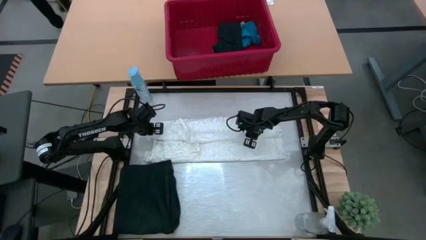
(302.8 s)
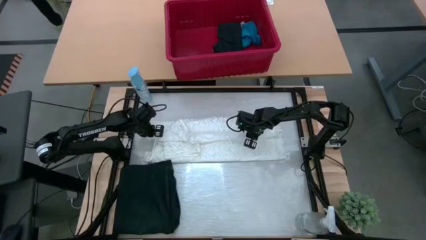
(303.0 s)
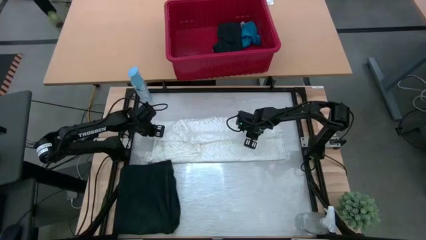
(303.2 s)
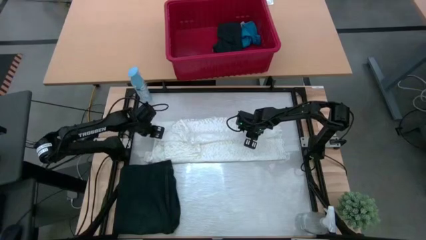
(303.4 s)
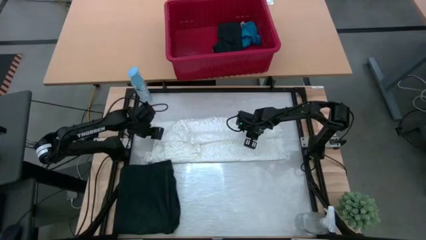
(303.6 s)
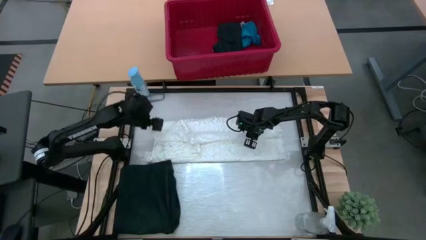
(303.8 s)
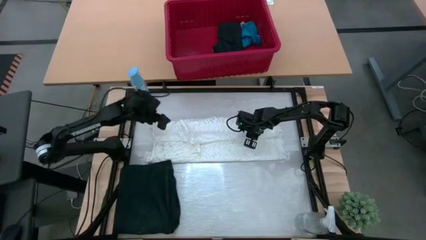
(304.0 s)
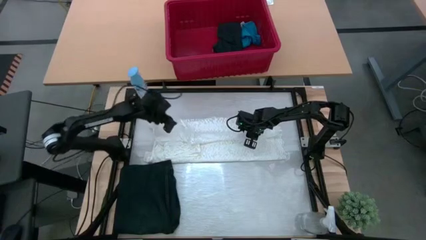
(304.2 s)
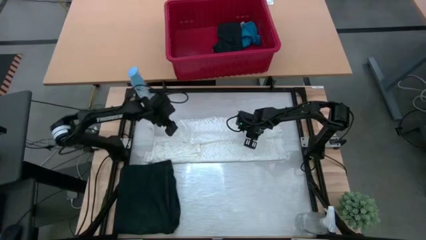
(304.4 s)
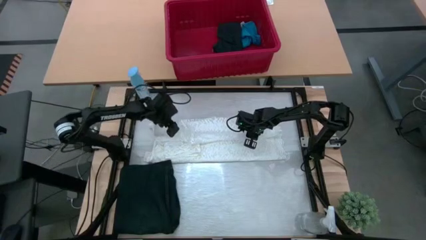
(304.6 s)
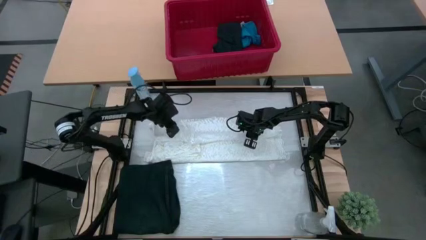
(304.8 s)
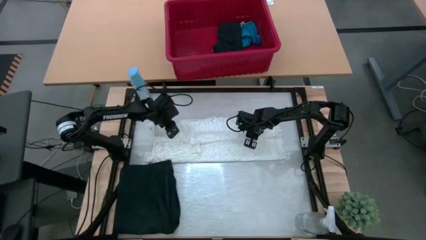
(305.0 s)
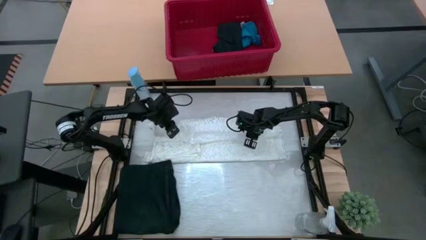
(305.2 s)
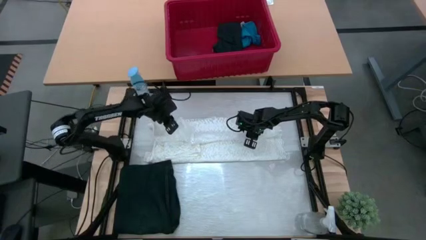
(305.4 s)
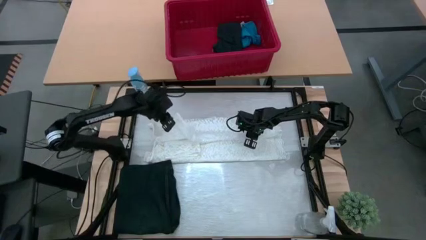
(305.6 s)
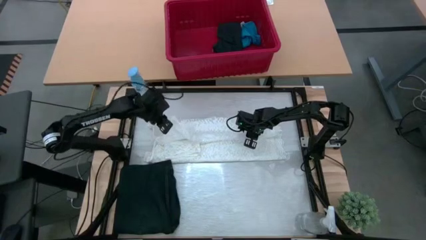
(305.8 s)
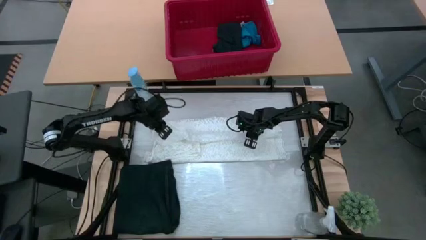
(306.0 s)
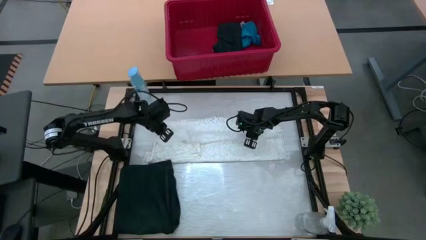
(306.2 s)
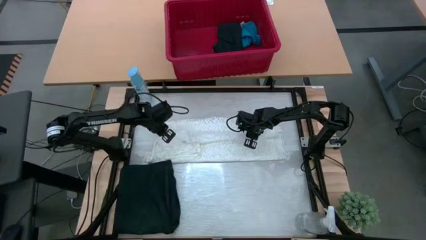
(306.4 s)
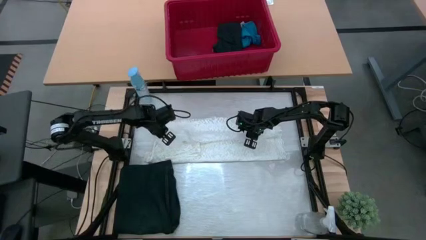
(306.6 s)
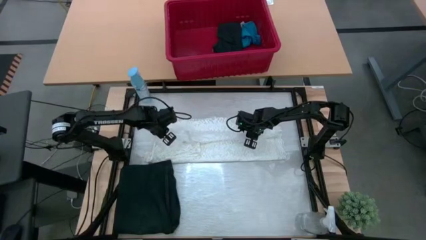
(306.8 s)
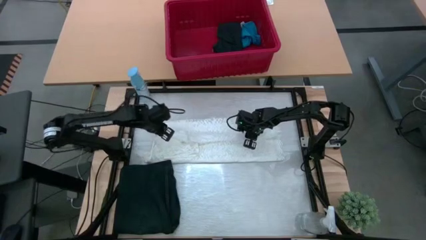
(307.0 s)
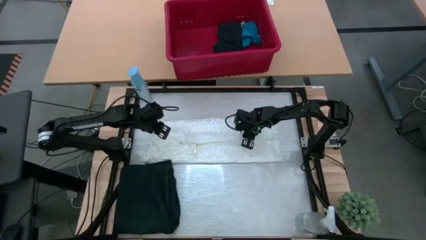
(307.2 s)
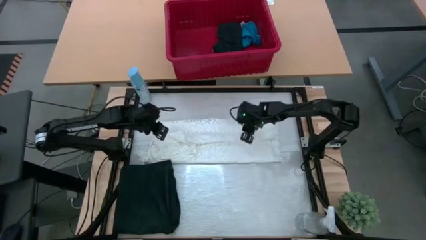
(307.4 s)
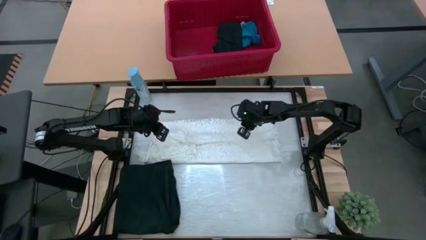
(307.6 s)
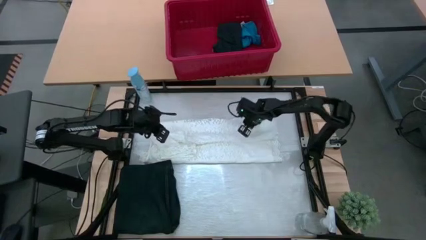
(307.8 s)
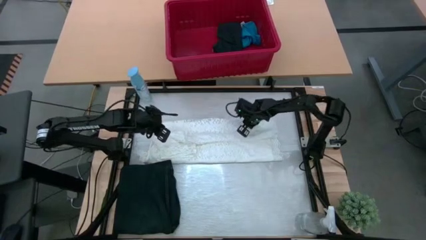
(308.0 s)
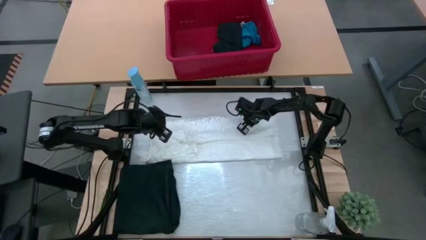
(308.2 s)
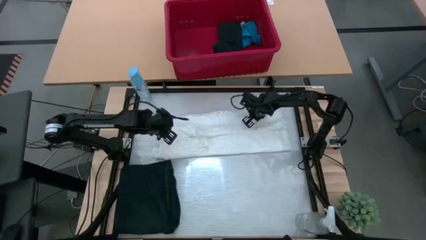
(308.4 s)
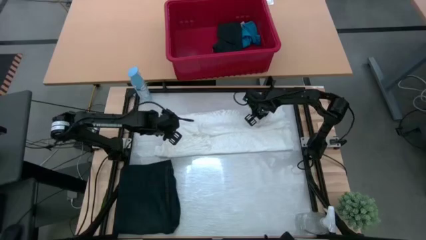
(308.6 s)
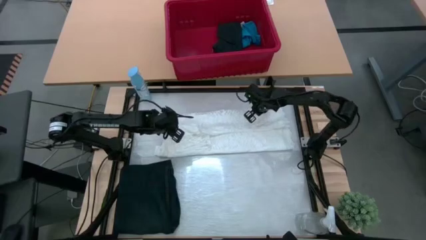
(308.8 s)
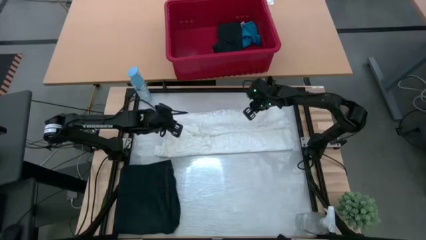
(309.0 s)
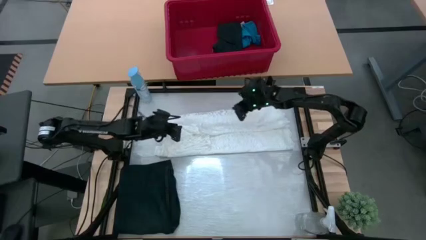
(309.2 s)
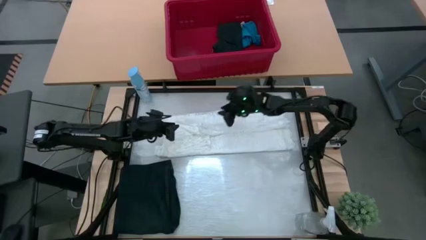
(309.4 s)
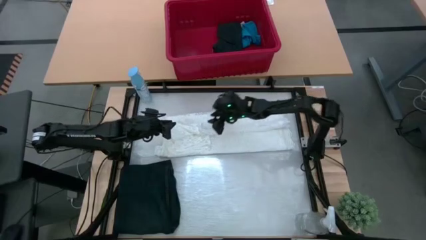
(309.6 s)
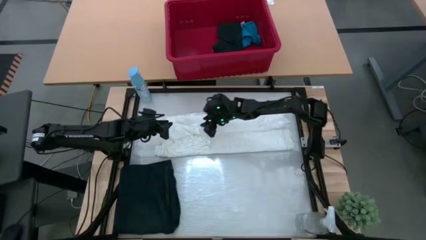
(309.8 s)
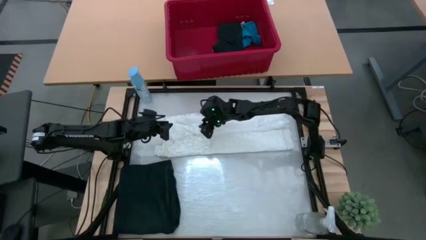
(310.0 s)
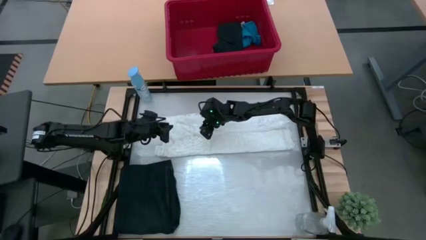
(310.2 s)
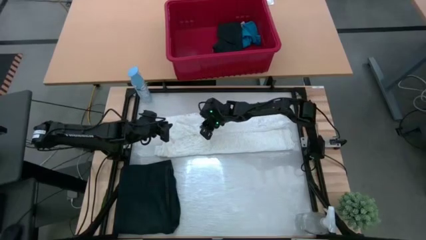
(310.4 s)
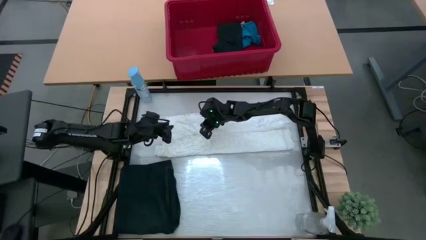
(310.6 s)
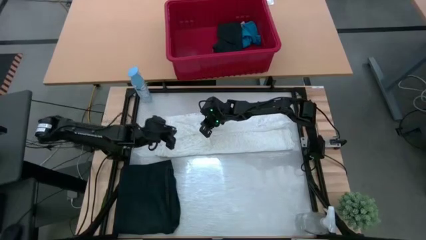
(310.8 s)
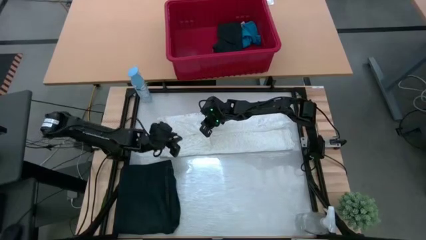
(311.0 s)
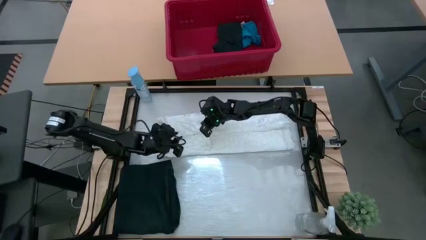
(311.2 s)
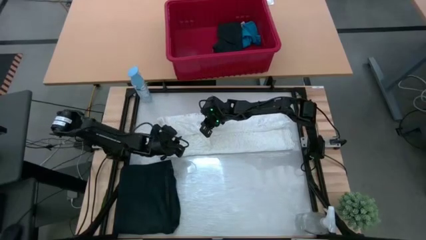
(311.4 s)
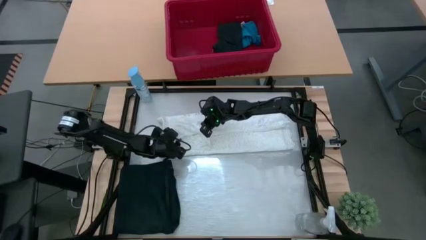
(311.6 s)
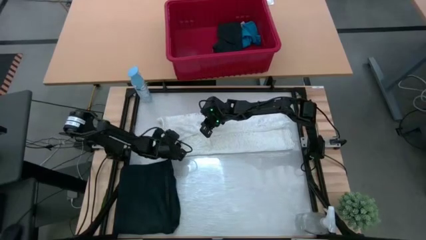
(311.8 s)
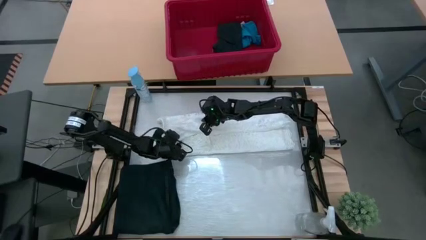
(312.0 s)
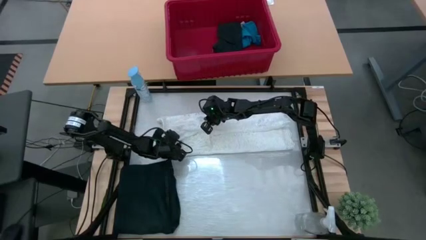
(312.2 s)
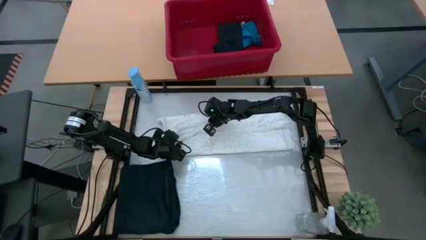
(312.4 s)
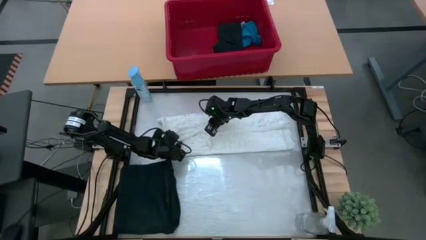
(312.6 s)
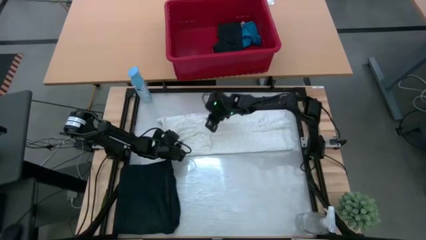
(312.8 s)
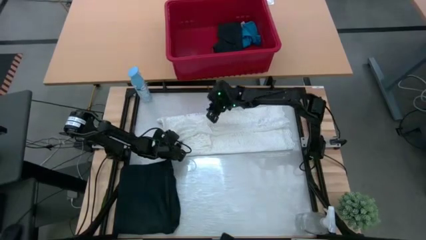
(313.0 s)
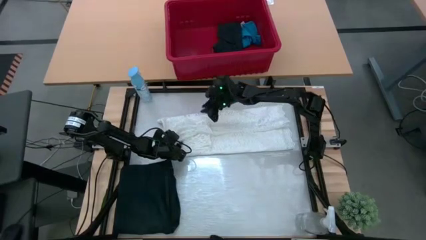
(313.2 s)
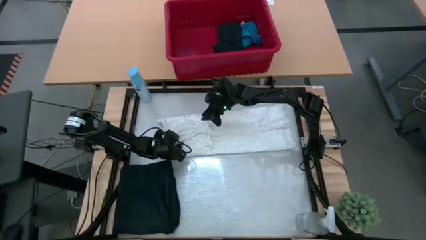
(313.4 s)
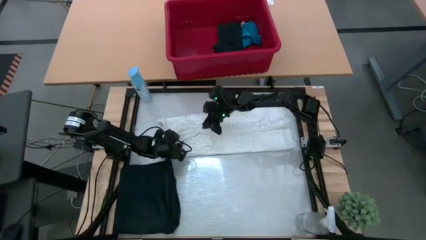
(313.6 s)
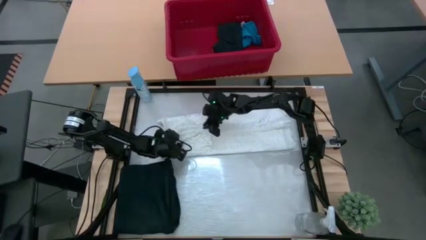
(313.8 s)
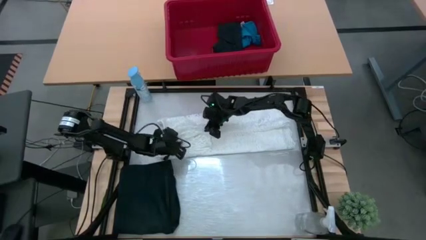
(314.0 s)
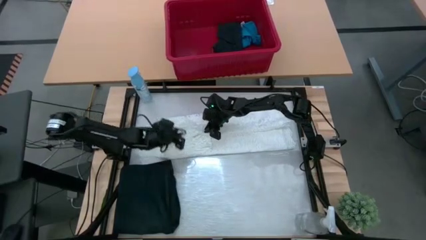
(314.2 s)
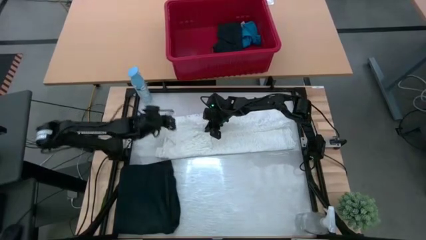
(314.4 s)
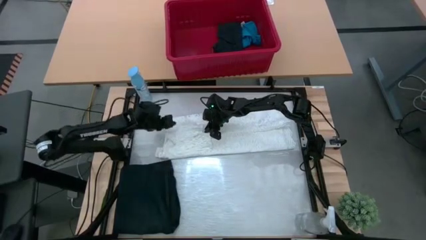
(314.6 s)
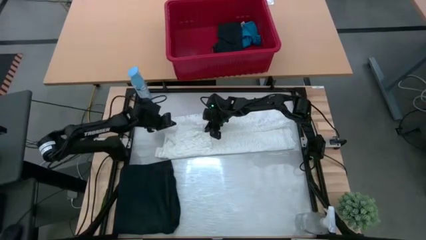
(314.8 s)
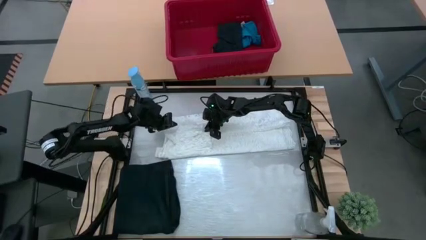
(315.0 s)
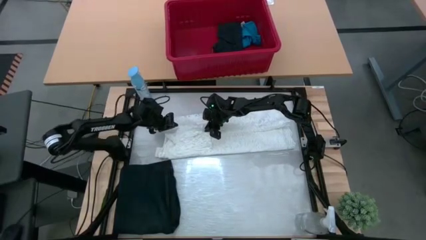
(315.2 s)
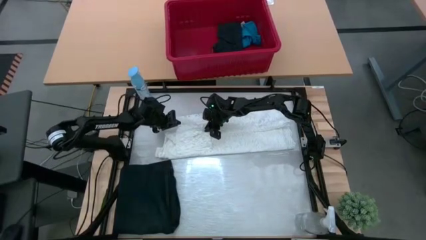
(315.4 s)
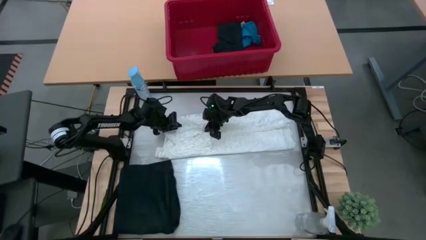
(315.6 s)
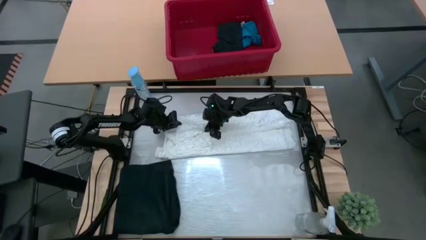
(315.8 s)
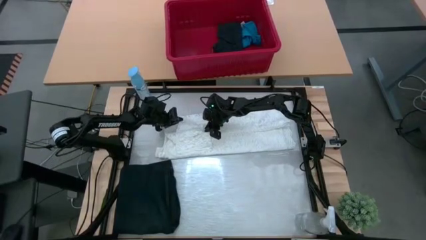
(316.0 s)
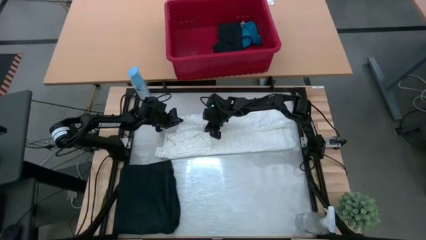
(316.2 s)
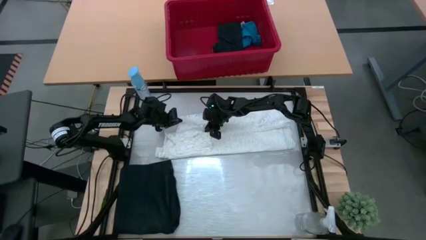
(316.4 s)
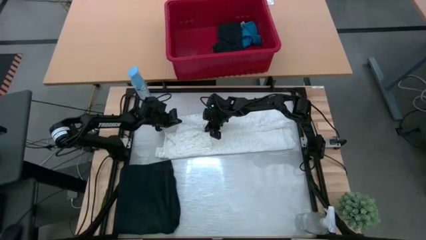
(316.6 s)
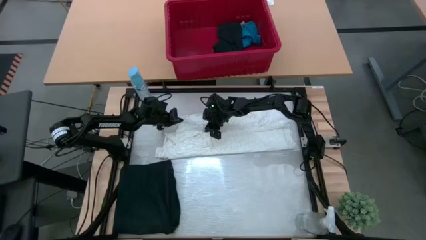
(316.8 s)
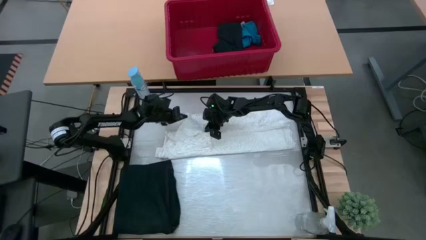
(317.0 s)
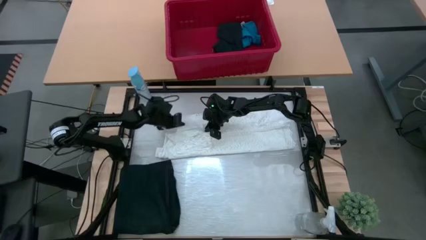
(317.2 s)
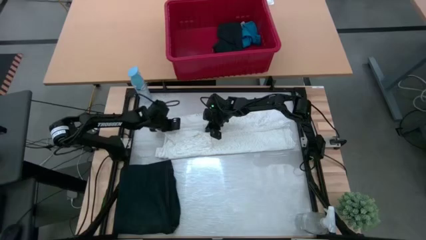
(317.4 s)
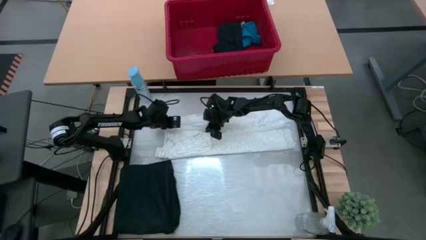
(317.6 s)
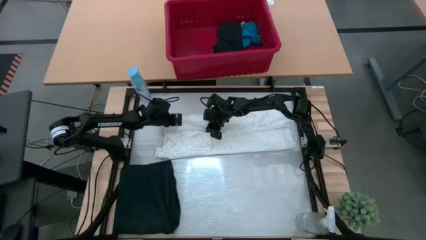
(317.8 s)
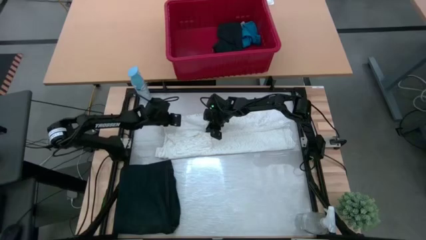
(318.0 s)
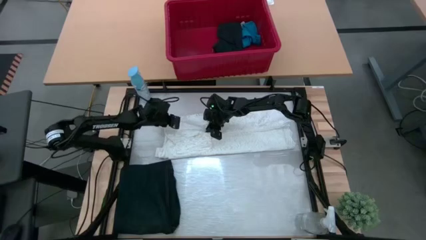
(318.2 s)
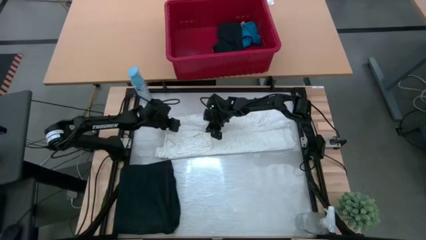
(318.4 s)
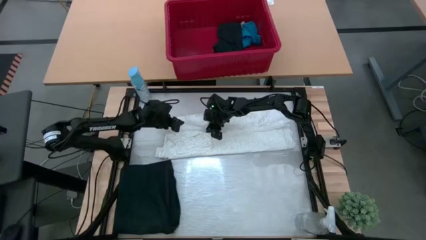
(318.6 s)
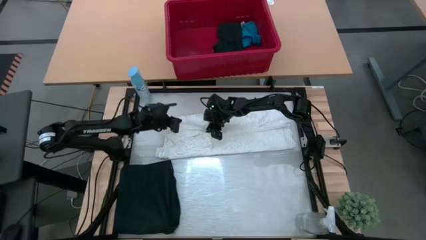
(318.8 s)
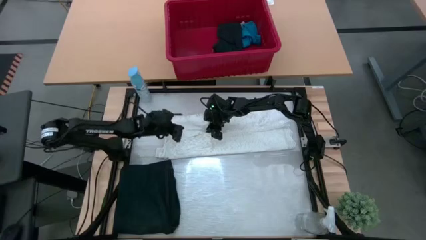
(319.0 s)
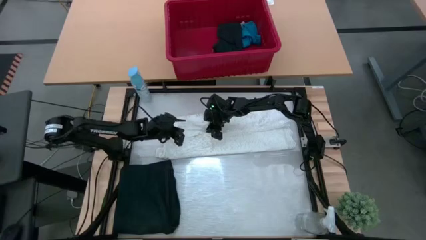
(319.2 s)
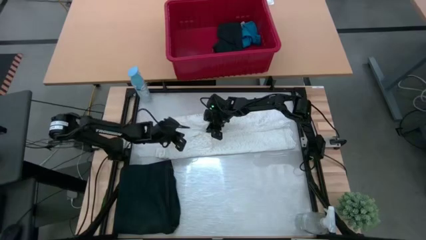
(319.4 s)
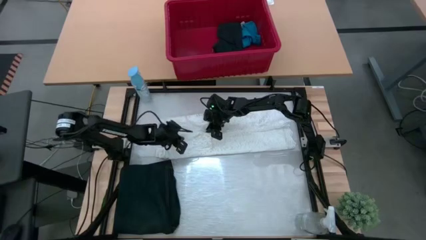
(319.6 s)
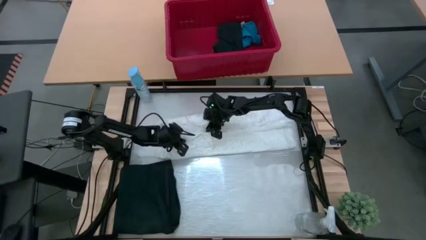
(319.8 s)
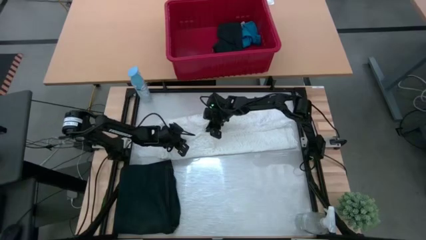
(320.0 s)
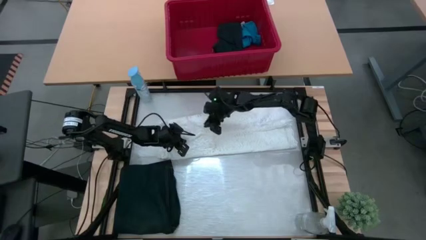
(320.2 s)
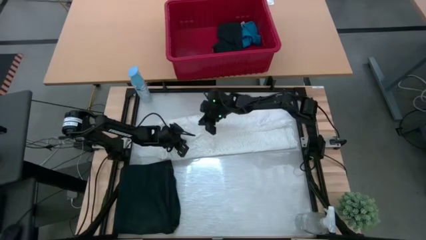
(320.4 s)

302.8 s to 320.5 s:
Task: Fold Laundry from Bin
Fold the white dress from the red bin
